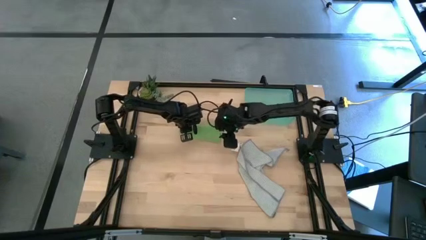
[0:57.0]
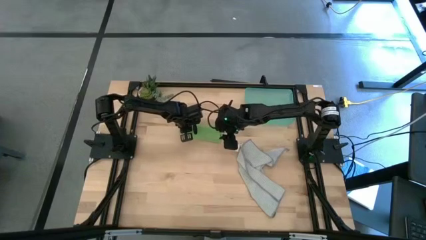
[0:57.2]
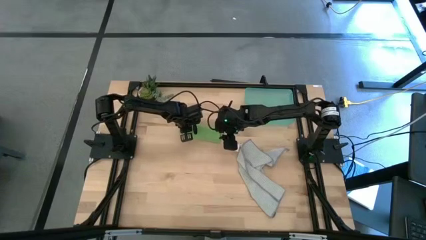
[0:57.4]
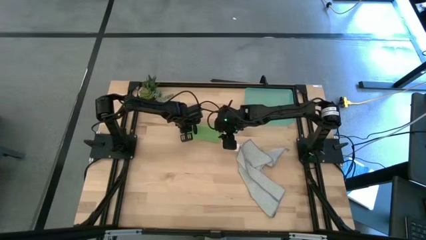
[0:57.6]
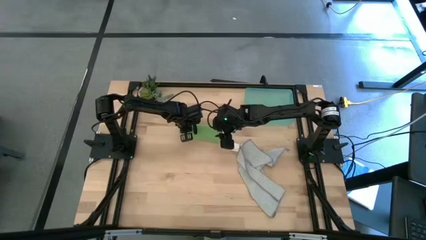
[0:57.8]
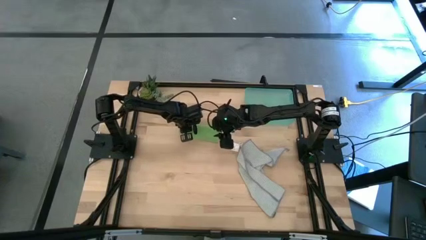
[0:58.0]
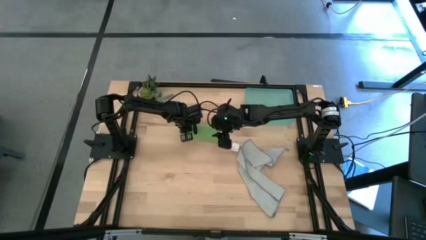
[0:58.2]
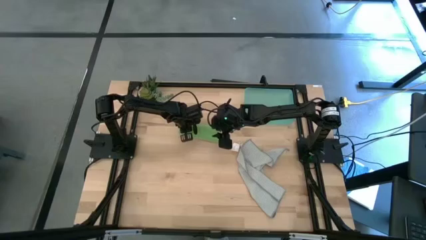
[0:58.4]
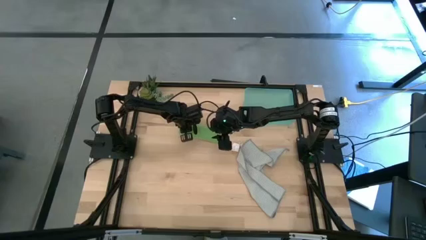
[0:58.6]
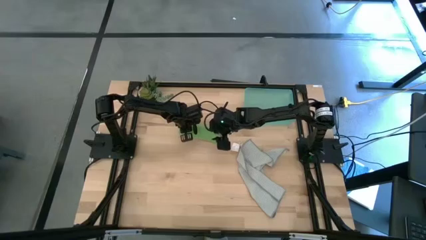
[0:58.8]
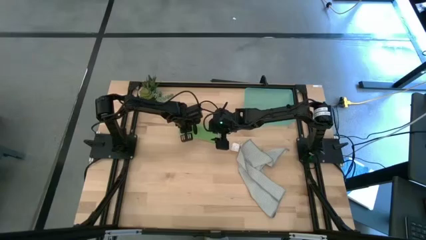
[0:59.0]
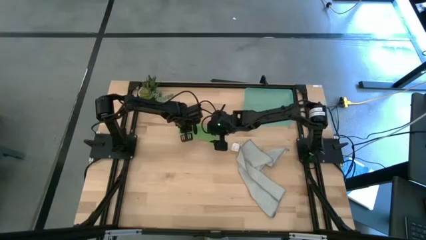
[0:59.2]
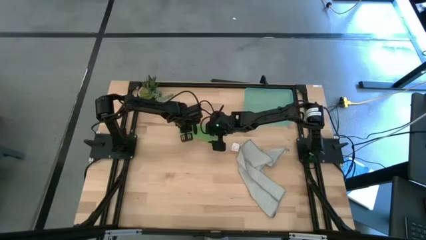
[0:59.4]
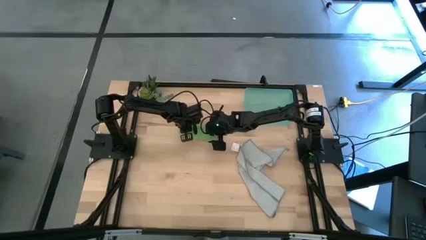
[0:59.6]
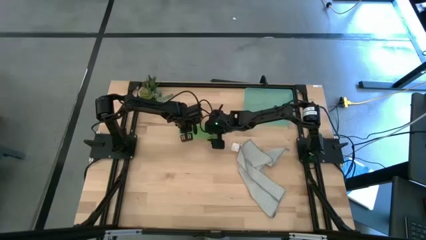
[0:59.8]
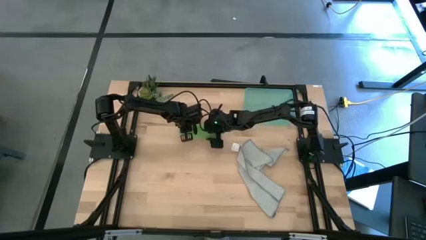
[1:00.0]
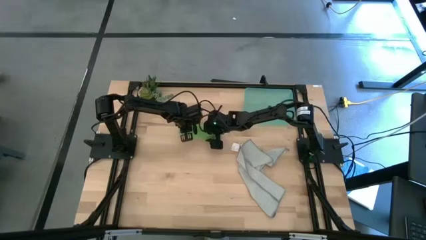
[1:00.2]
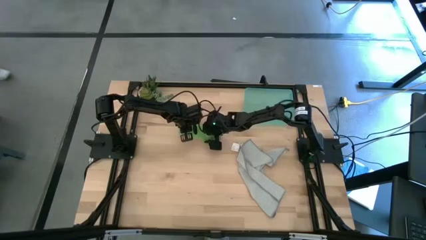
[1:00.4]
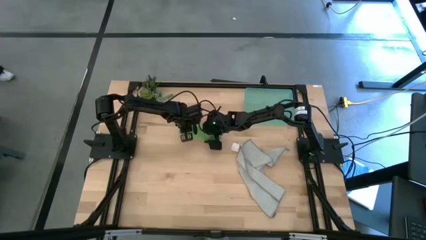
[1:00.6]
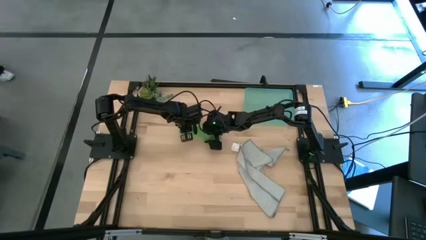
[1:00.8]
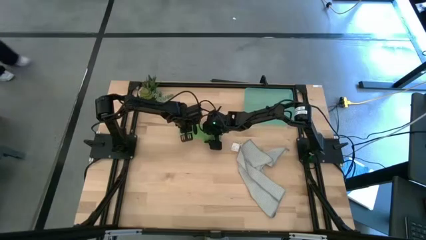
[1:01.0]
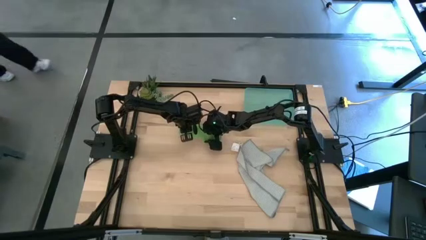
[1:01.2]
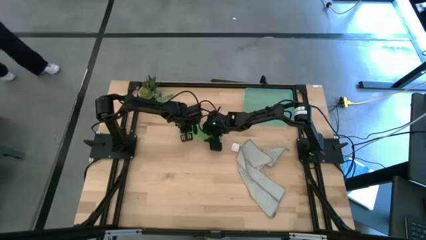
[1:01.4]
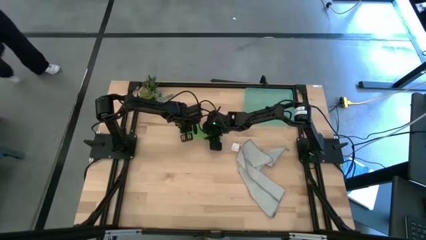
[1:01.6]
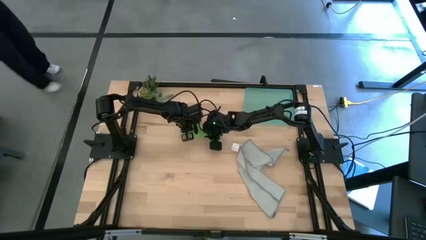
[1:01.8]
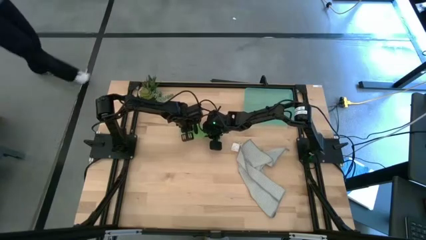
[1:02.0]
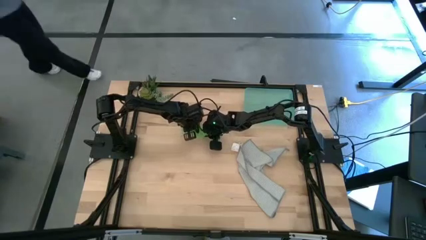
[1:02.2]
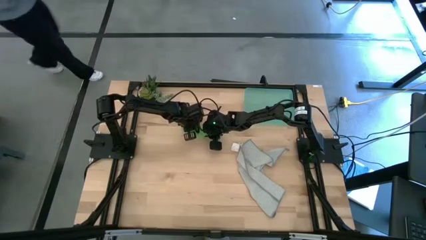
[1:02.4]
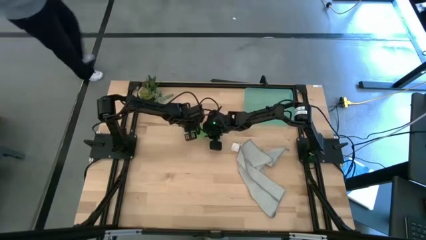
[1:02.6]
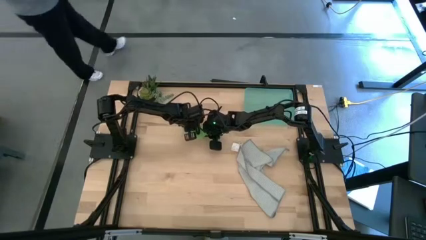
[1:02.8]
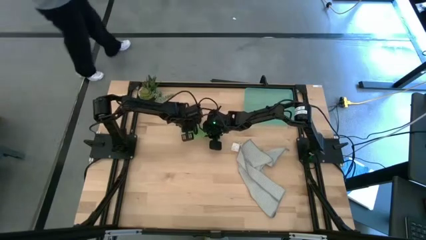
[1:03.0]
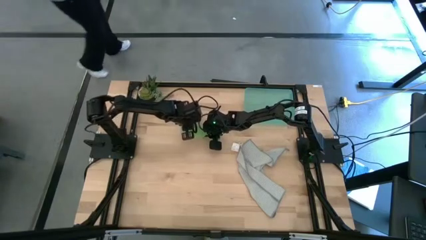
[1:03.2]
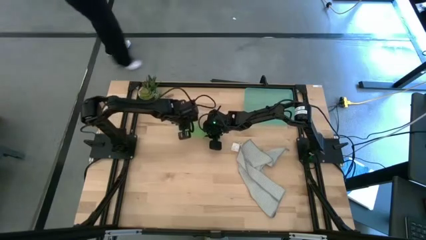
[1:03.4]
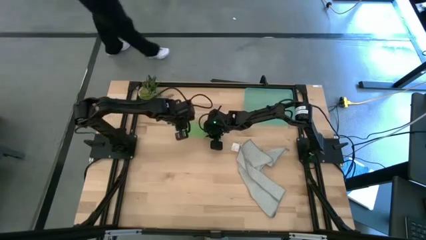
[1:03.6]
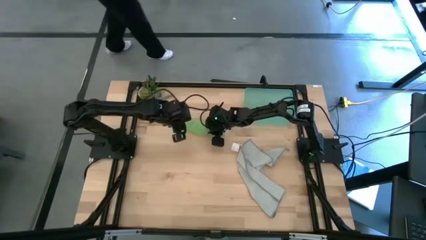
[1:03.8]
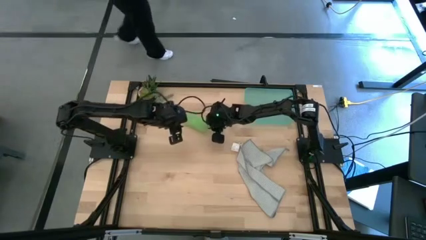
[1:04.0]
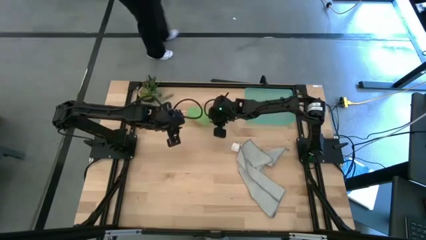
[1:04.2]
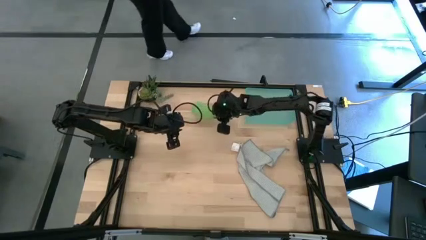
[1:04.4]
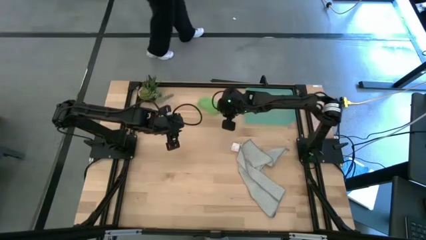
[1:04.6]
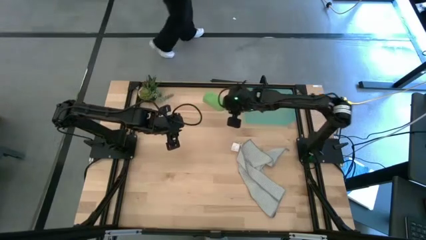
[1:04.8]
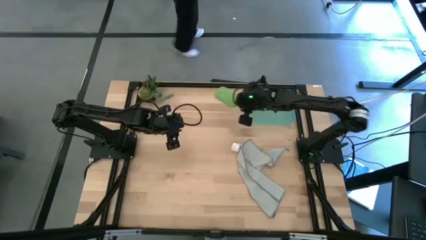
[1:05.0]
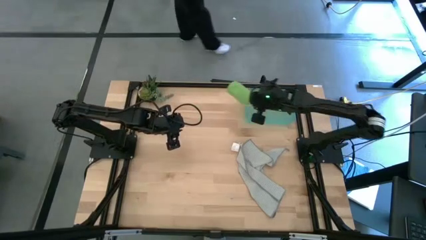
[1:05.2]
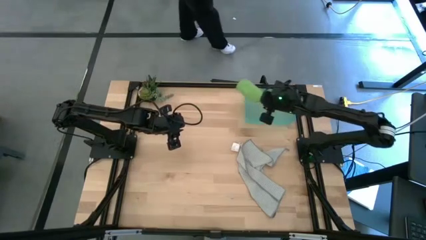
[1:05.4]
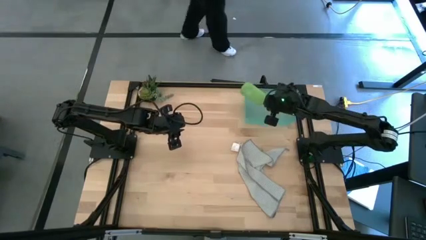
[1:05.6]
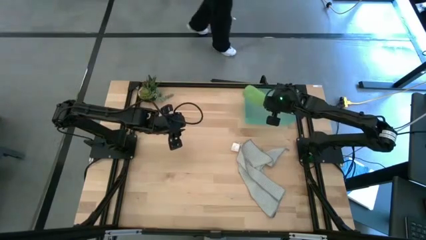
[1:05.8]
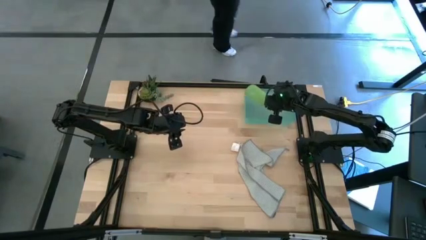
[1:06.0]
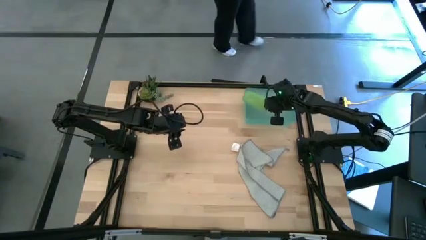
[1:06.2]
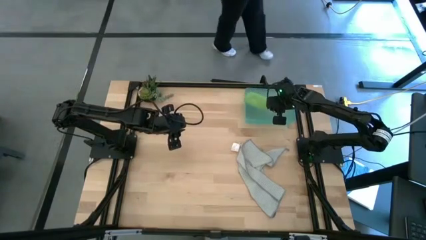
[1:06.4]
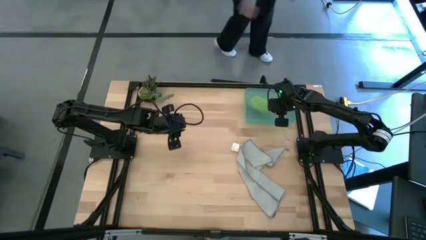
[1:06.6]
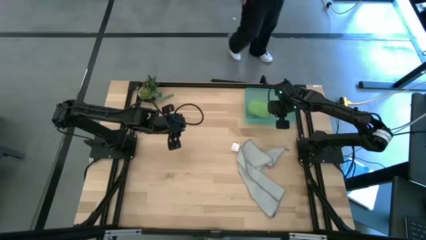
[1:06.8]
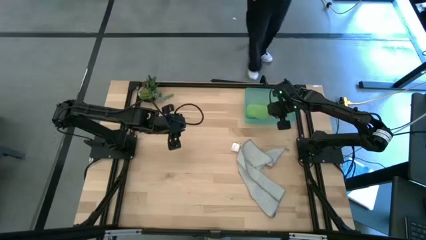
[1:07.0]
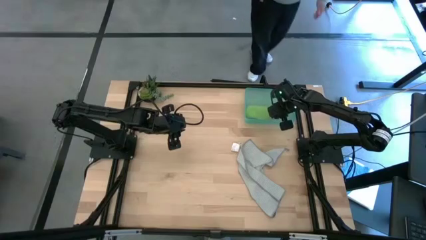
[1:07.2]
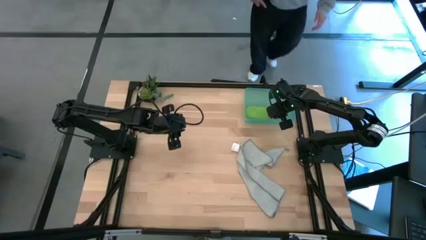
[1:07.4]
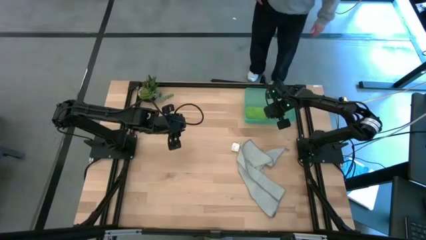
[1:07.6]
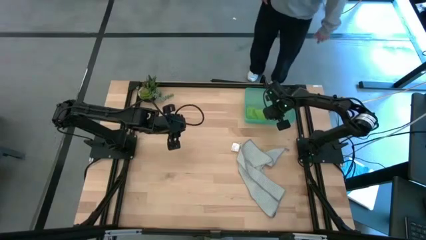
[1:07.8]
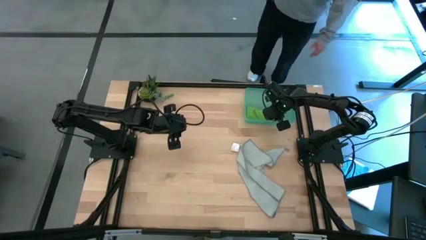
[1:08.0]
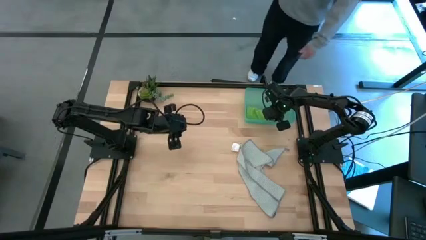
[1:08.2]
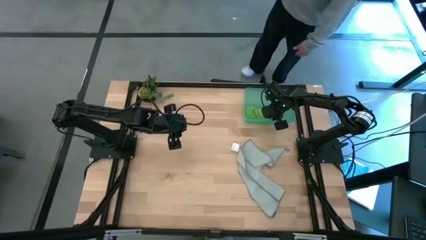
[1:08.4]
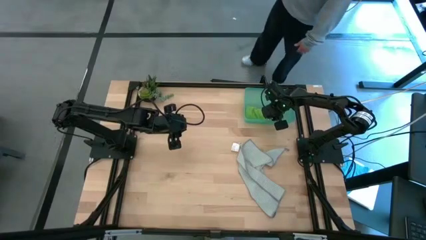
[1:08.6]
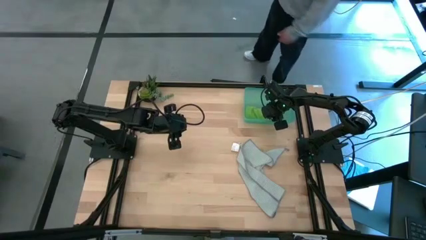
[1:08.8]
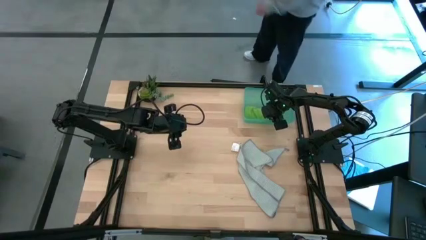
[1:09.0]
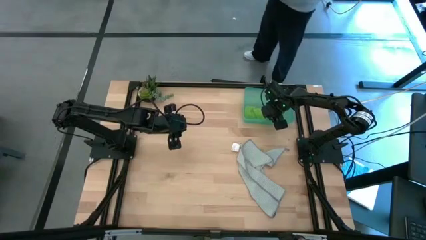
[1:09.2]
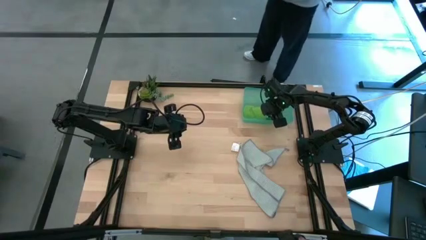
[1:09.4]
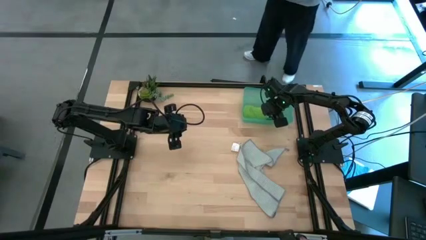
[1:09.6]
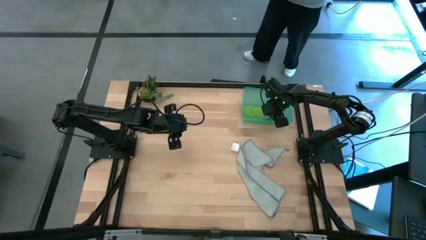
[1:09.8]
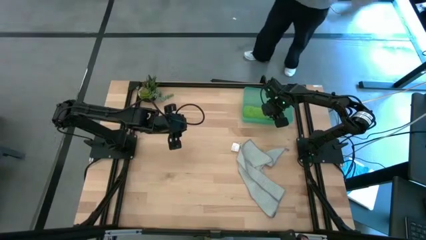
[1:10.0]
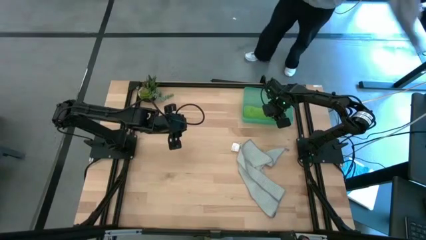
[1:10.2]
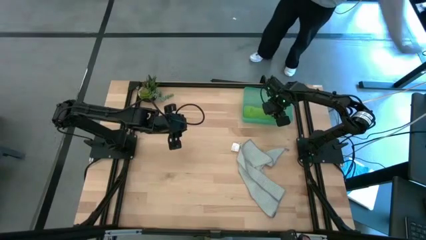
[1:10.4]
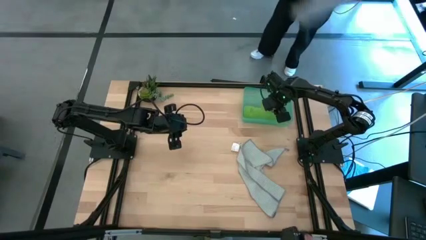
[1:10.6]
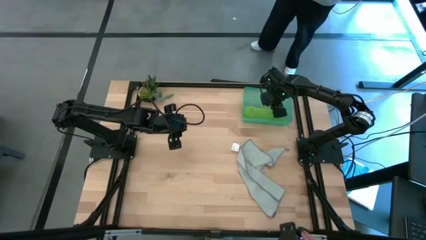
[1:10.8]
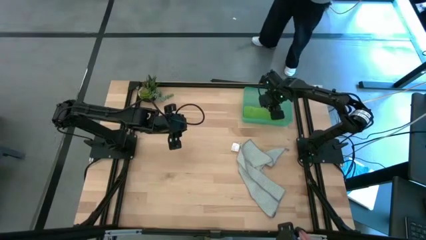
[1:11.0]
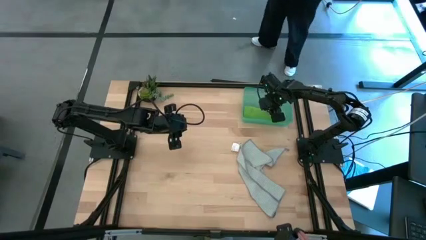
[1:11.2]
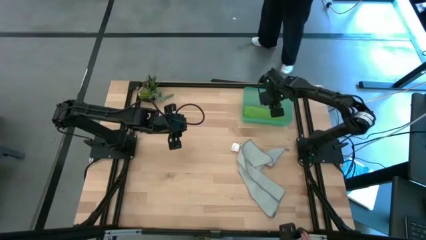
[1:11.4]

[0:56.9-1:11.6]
Task: Roll microfiber towels into tight, uniform cylinder then place into a basket
Put the green microfiber towel into the green bin
